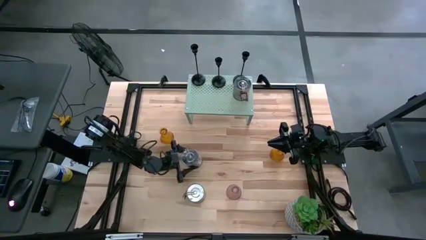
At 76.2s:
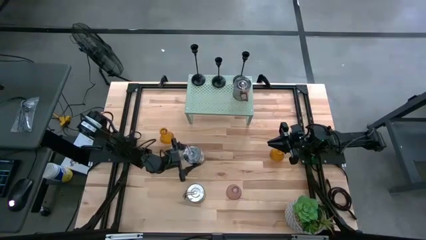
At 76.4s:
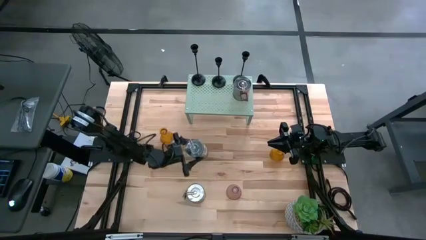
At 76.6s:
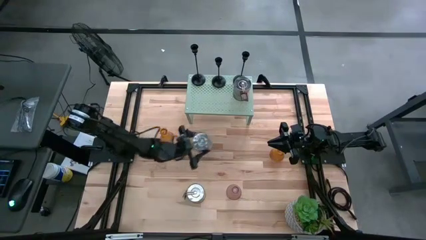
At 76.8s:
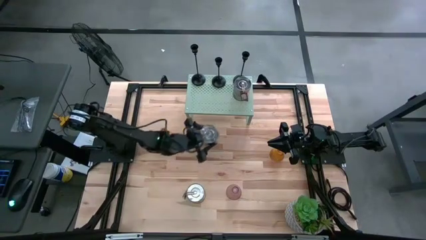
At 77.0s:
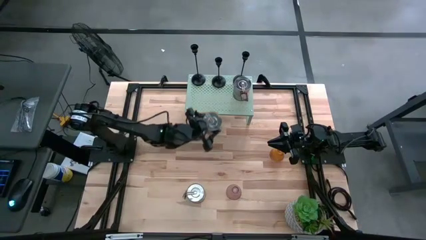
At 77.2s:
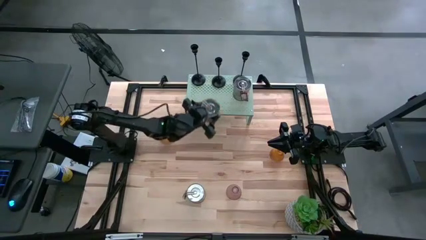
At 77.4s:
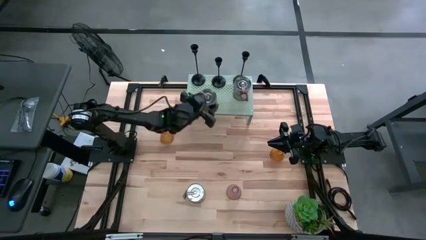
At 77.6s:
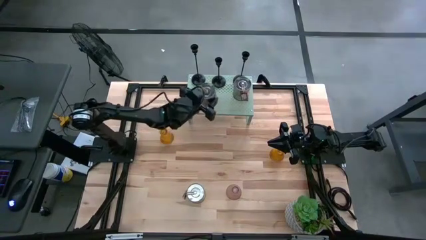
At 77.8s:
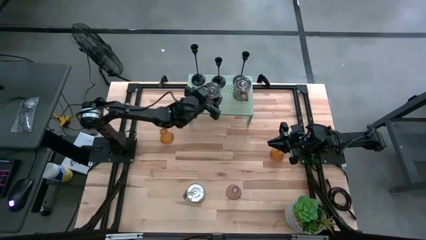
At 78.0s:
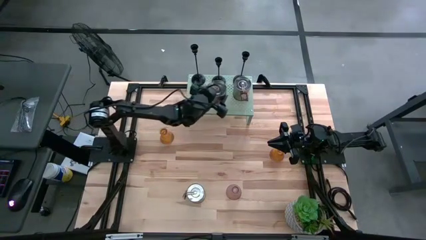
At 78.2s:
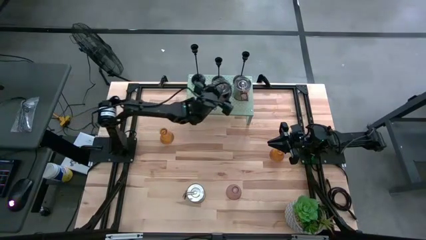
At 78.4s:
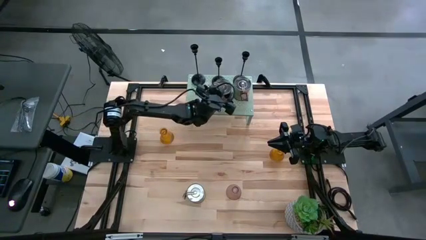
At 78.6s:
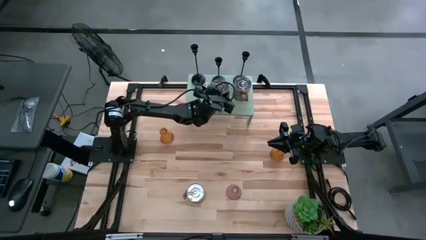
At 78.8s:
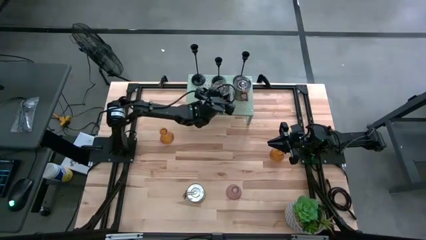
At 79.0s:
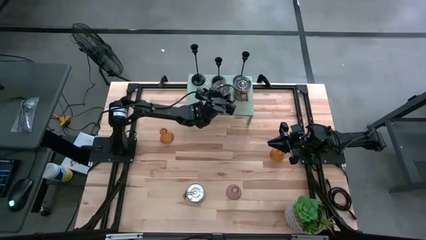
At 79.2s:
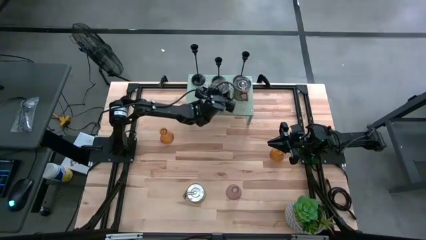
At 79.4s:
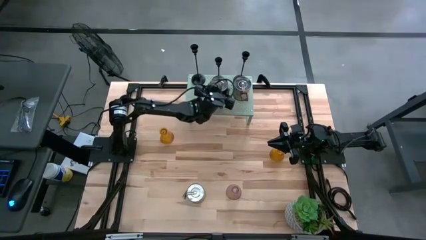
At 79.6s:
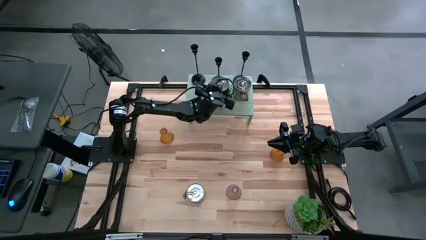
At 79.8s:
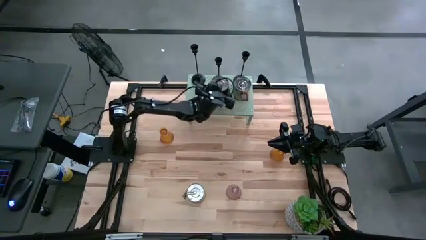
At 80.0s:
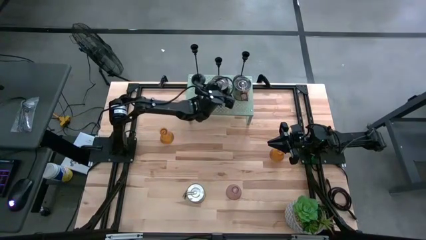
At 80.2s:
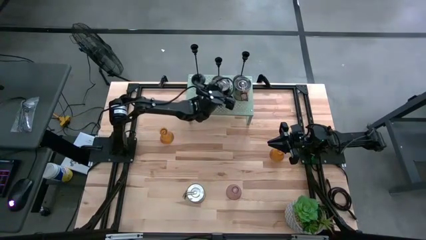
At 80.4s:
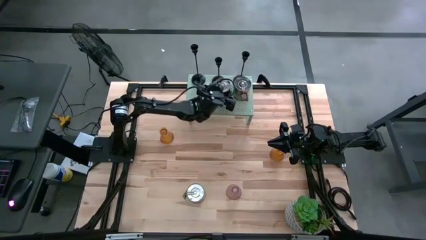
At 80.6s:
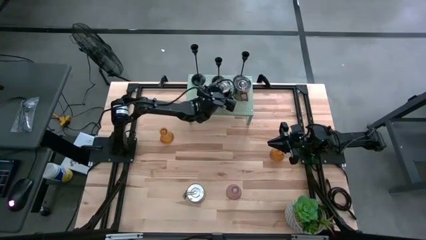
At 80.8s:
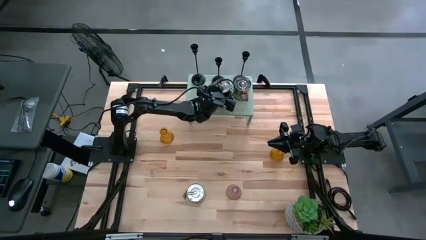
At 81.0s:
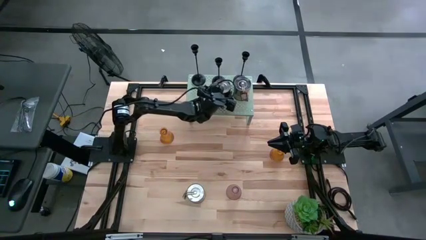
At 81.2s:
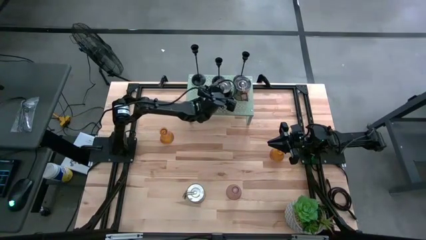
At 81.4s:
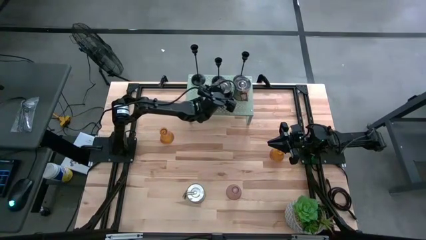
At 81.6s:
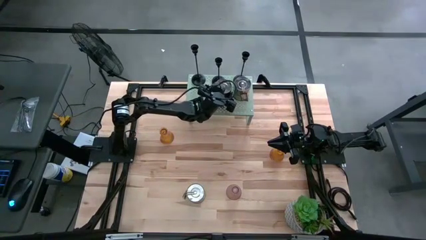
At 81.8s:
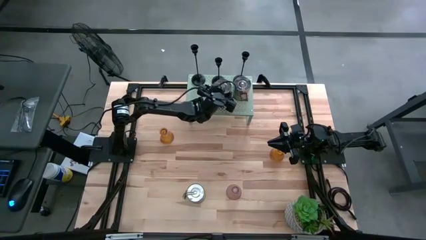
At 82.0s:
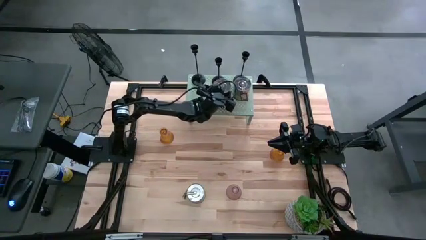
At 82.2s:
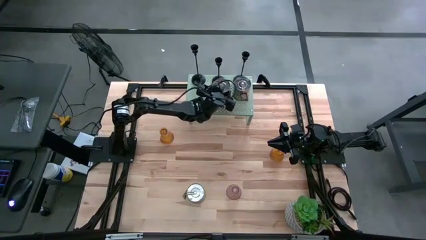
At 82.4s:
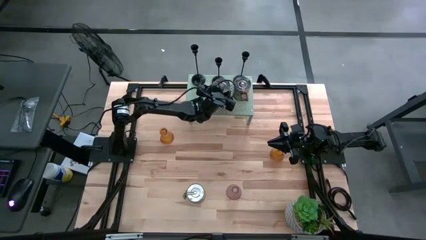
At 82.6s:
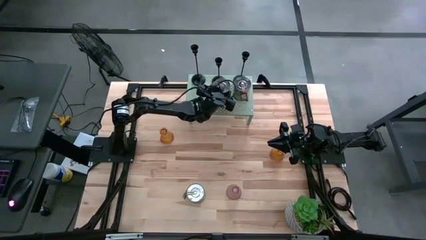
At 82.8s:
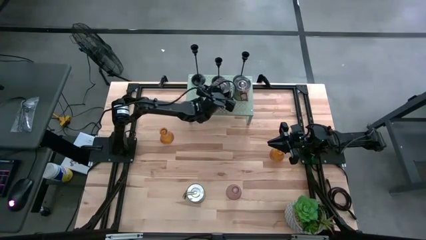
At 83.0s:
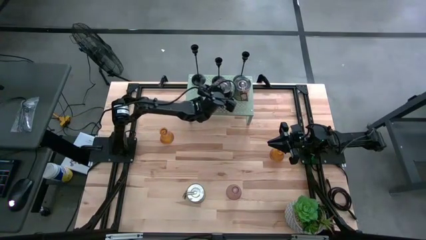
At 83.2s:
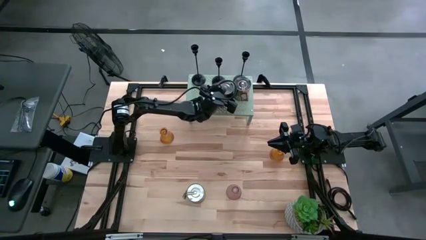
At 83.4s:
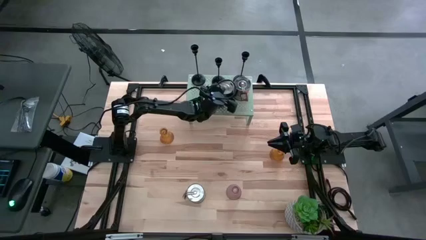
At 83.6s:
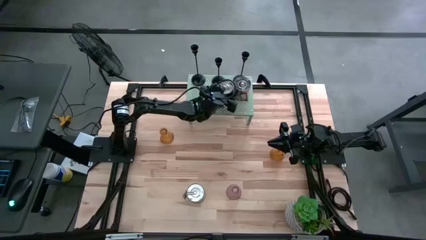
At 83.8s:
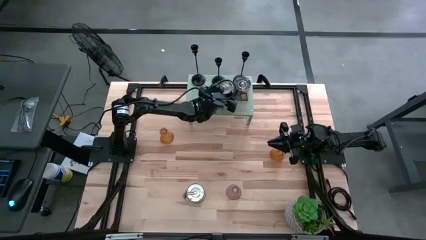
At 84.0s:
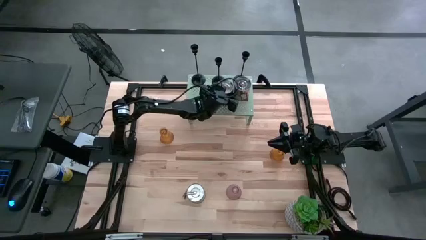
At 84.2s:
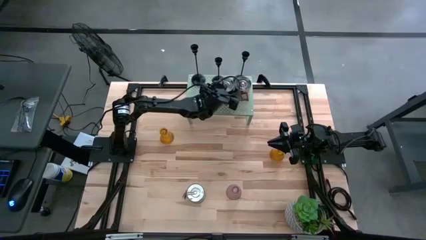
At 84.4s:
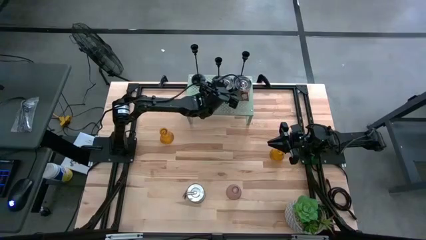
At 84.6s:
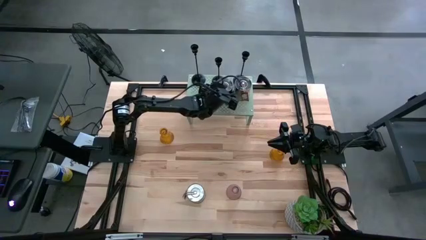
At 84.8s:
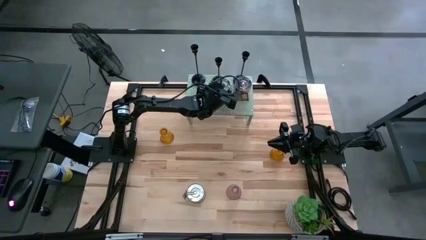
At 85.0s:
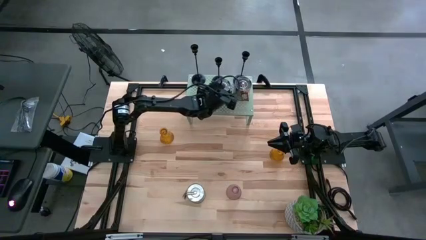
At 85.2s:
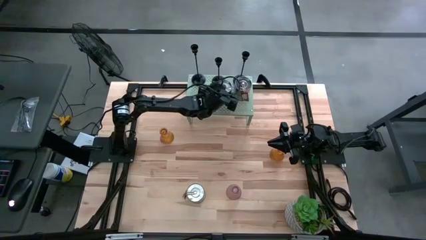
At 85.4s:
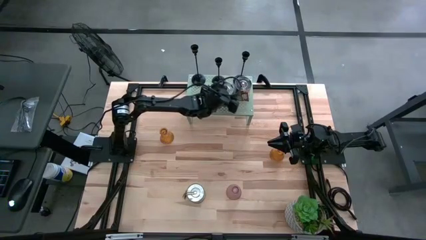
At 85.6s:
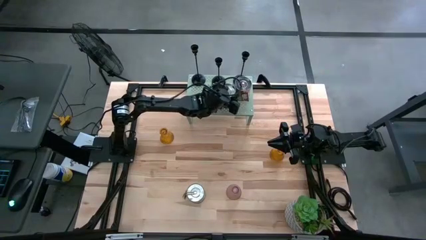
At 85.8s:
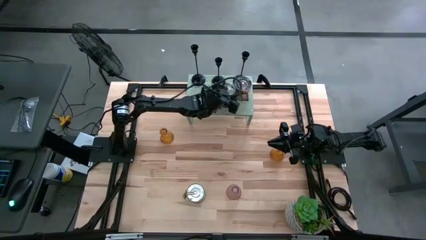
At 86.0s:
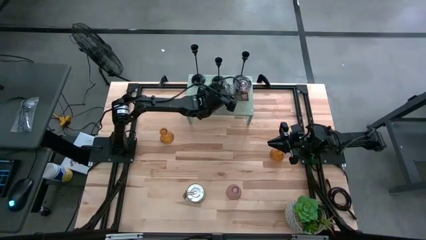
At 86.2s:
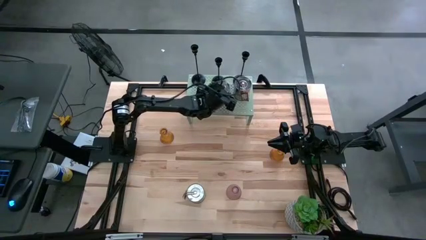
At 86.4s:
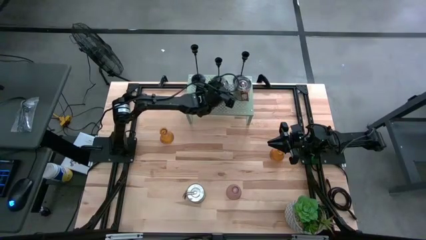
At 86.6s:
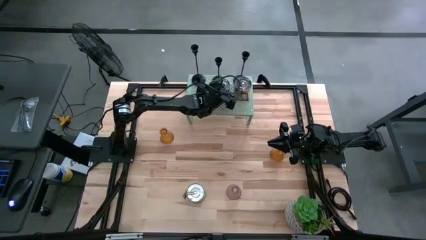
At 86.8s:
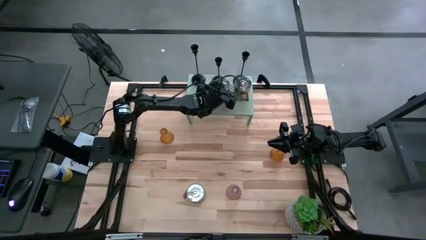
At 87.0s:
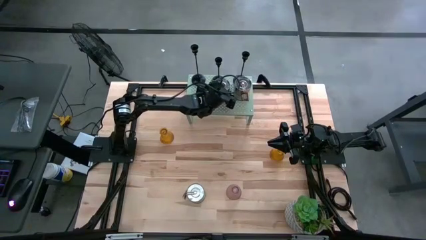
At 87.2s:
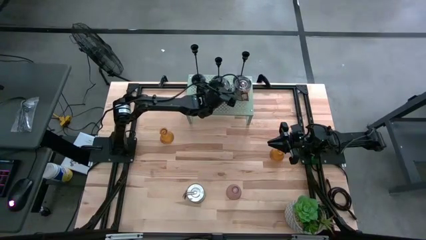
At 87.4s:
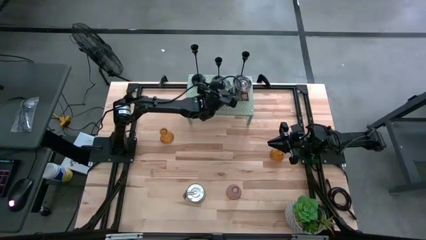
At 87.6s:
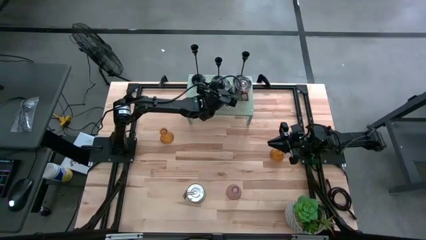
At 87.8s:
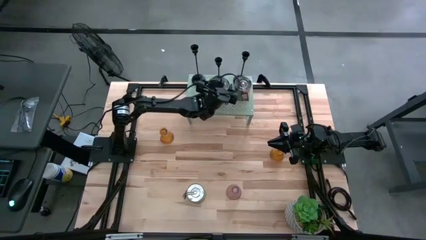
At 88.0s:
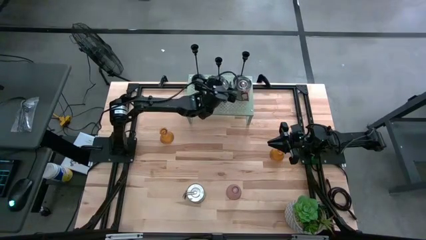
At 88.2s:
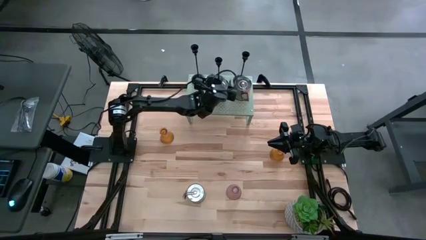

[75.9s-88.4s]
Task: Pick & Place candle stick holders
Put the top scented candle on the shelf

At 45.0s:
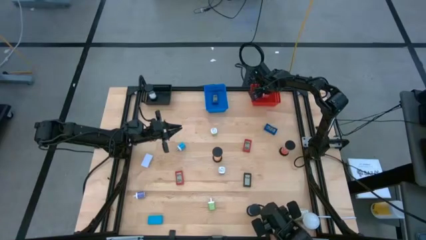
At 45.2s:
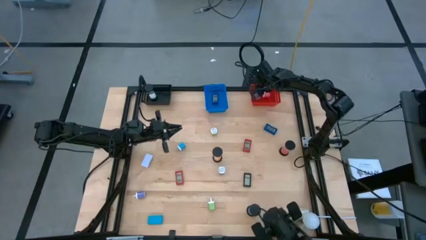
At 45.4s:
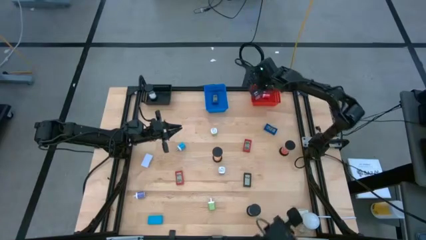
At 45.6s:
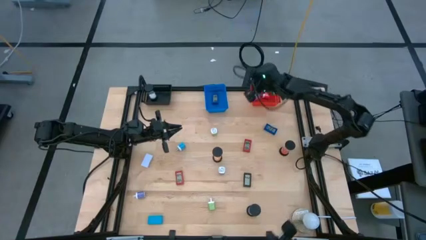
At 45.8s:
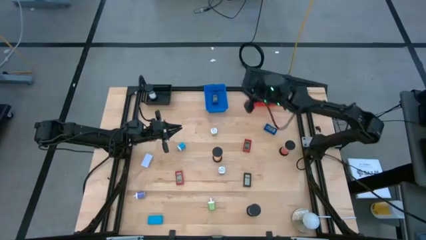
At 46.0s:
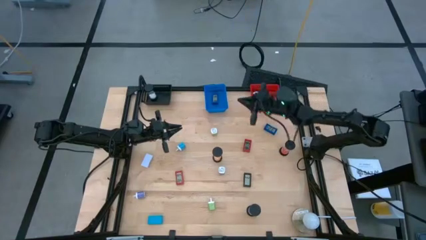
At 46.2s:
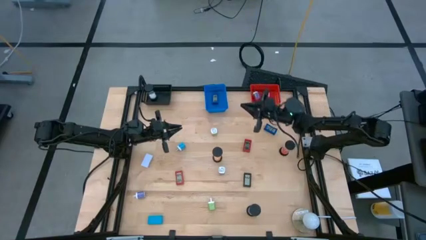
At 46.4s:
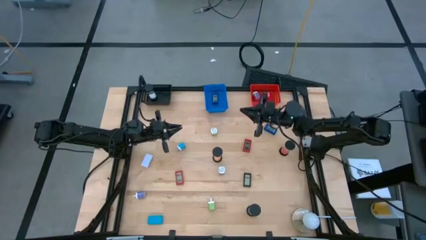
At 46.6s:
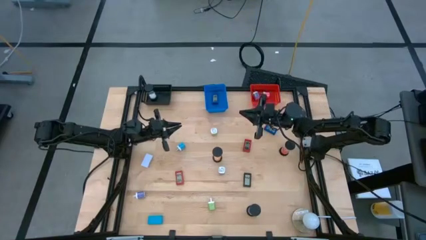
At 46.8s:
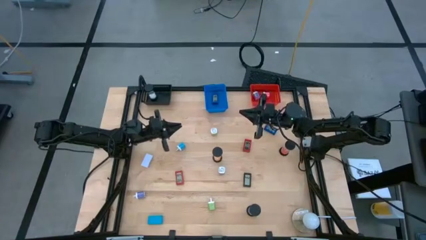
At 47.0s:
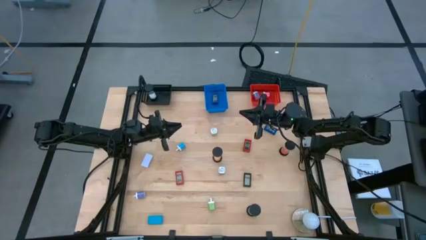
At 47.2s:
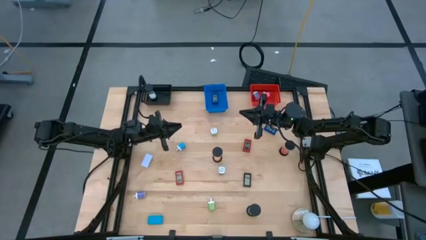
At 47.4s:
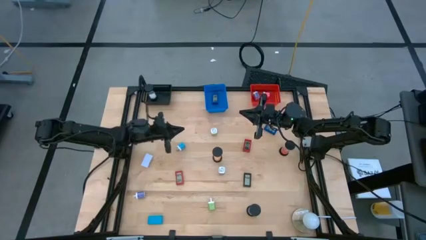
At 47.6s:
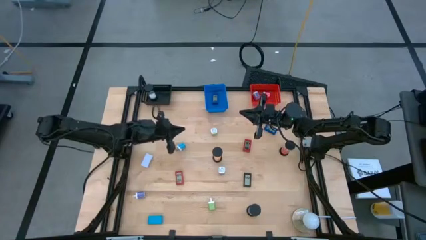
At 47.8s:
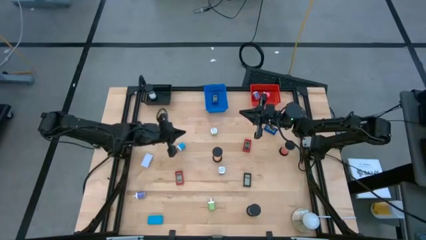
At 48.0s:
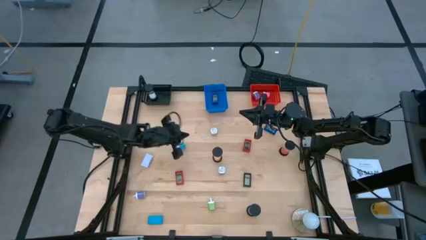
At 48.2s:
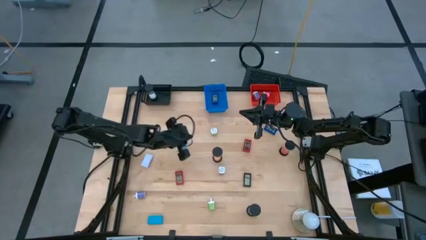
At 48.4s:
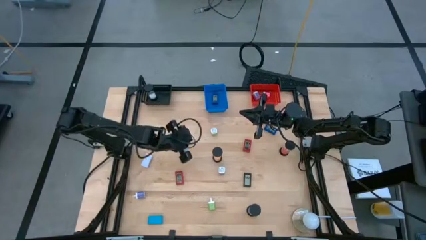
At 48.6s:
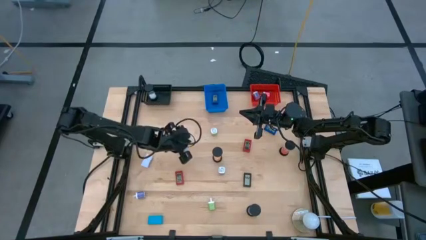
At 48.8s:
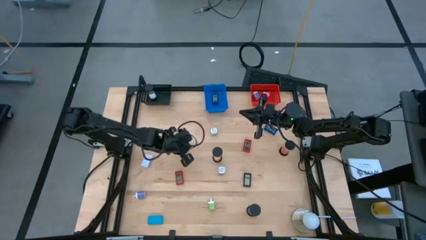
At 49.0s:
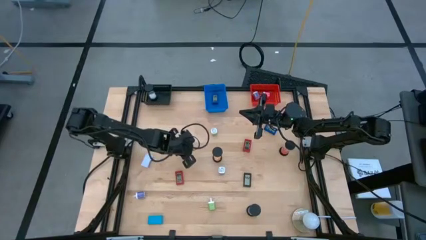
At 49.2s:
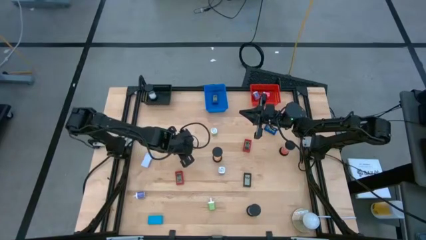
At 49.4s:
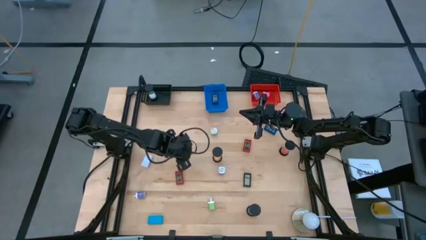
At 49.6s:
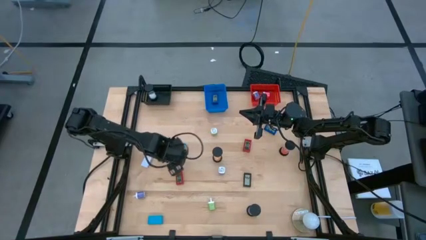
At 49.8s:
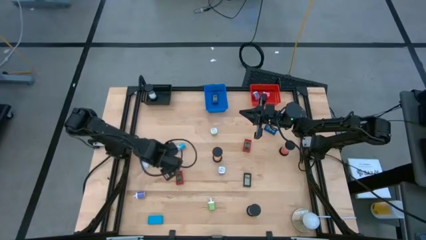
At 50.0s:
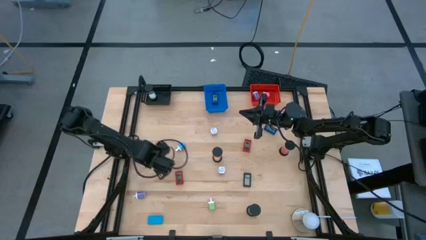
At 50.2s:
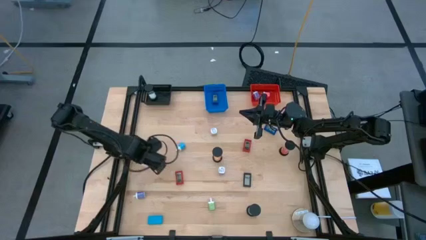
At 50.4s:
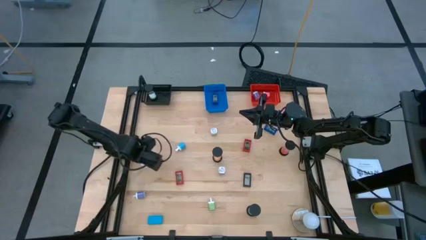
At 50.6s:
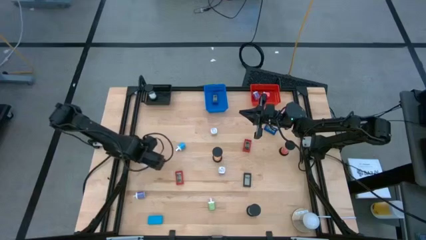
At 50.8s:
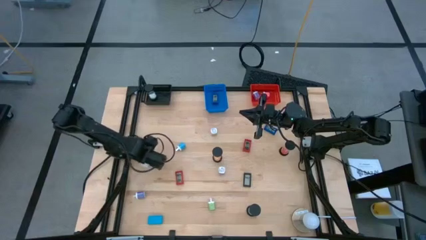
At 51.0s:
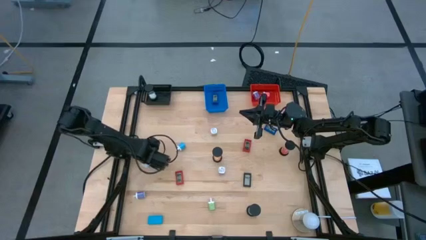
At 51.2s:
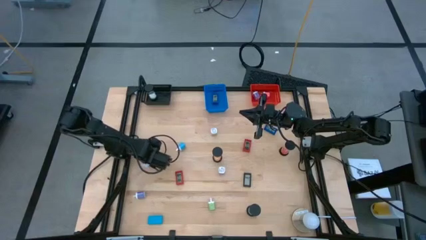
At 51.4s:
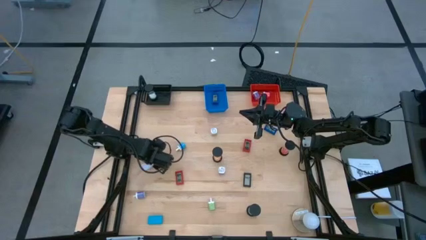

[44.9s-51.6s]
Task: Pick & Place Office items
Put the white digital clock into the blue basket
